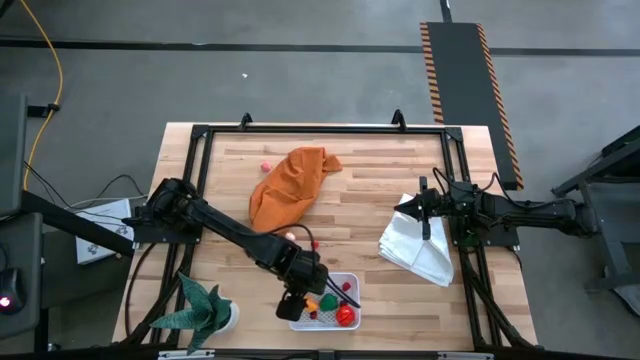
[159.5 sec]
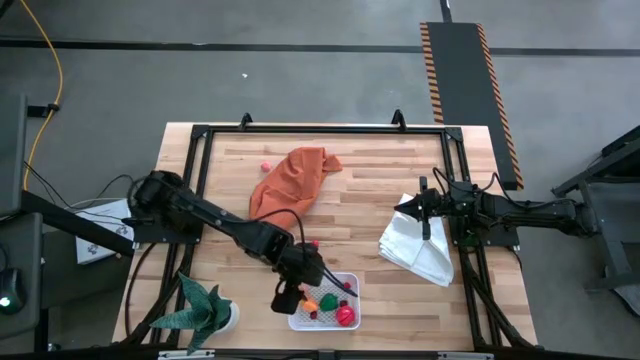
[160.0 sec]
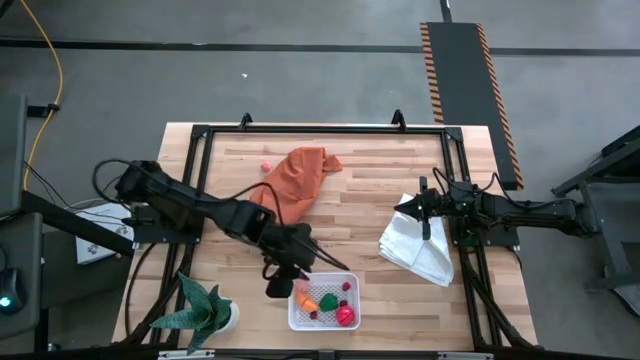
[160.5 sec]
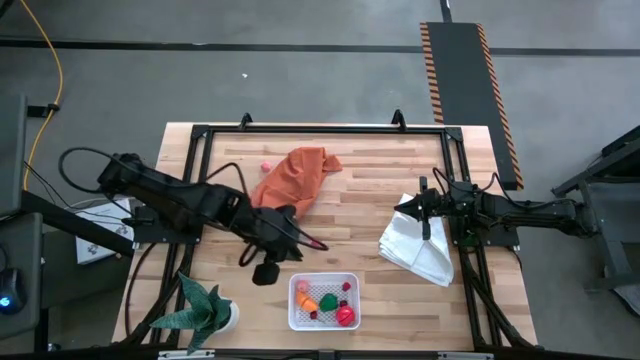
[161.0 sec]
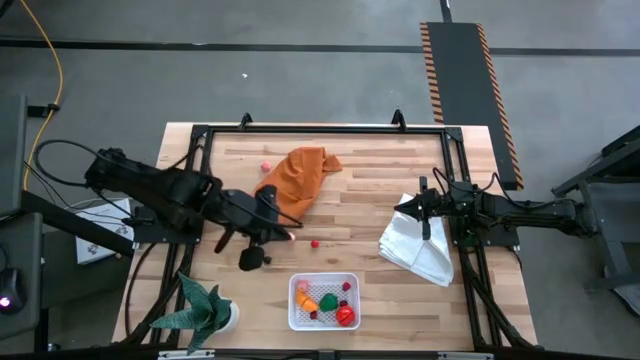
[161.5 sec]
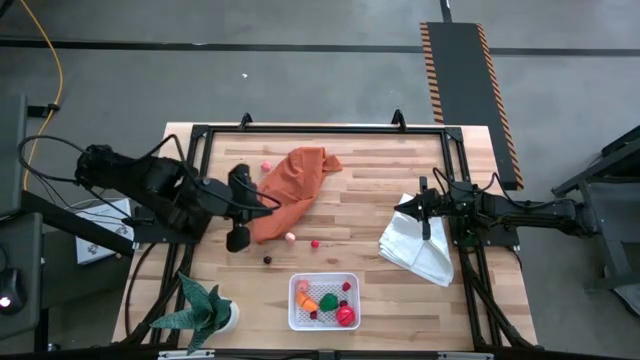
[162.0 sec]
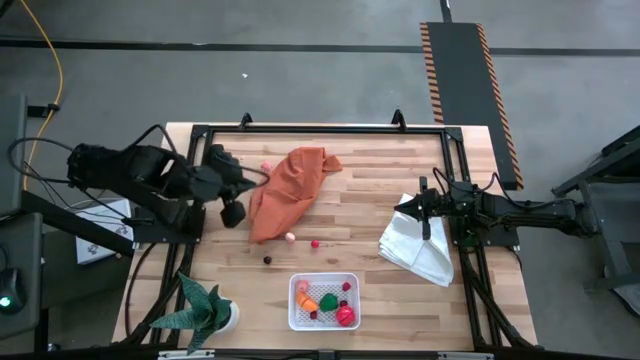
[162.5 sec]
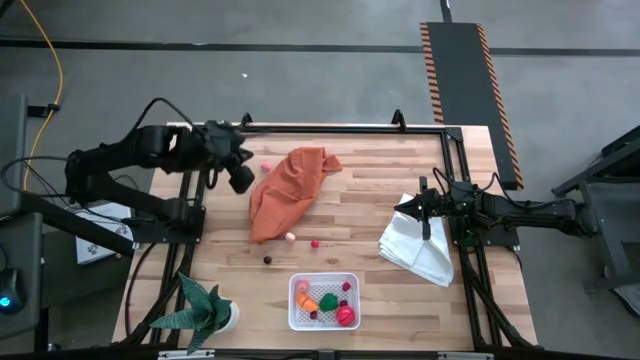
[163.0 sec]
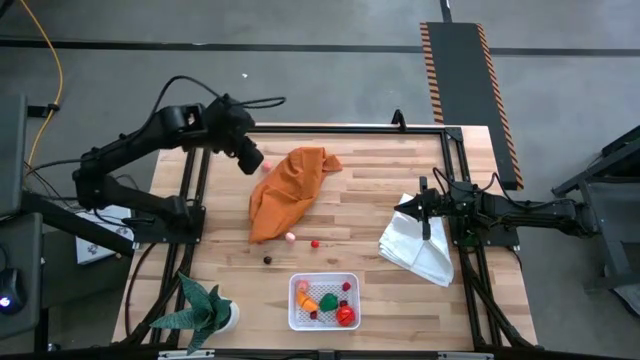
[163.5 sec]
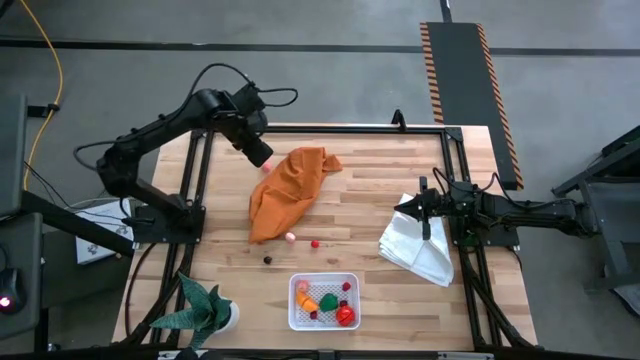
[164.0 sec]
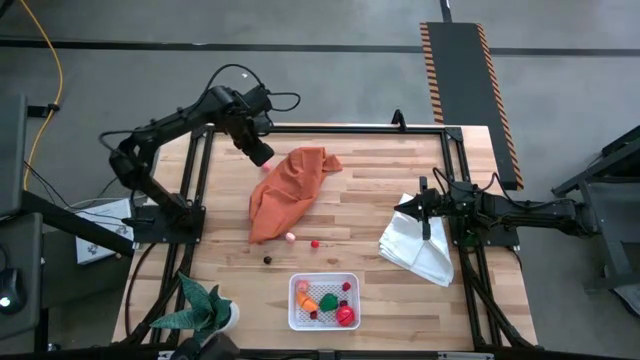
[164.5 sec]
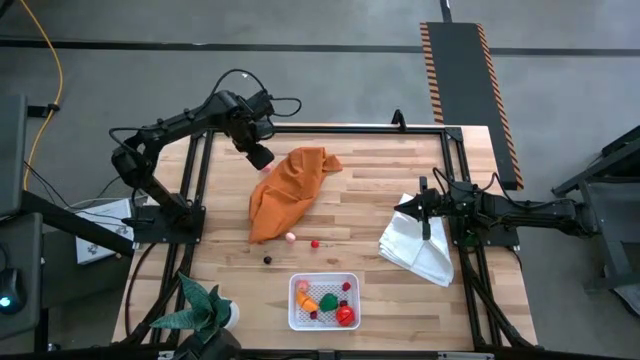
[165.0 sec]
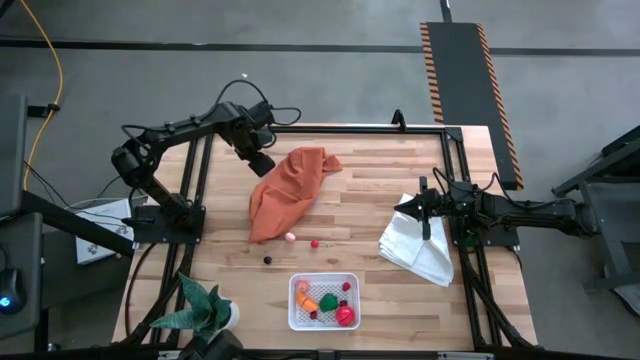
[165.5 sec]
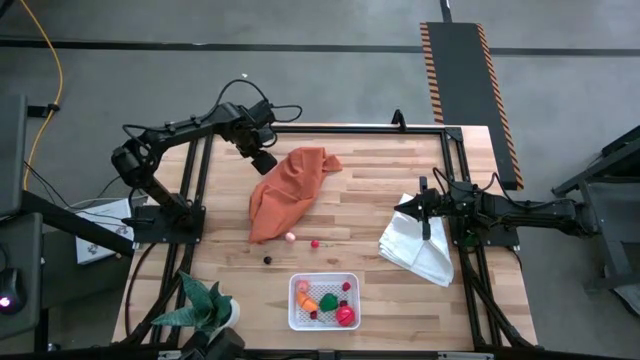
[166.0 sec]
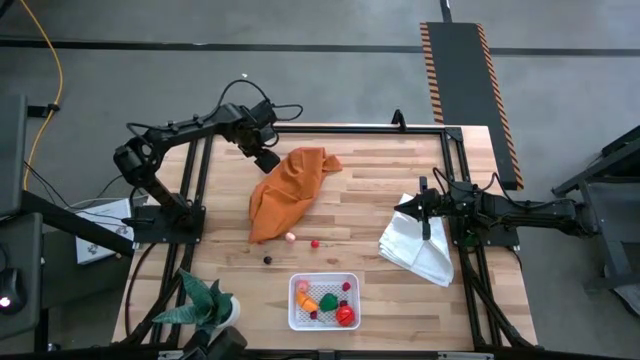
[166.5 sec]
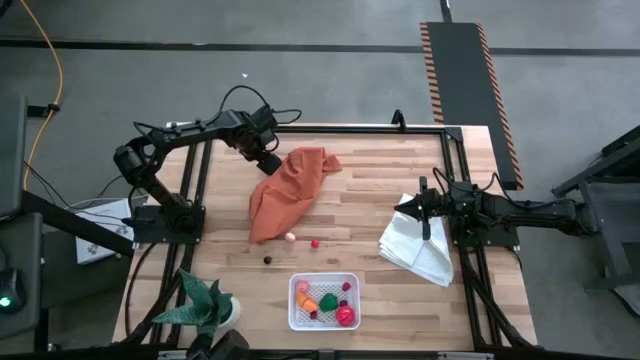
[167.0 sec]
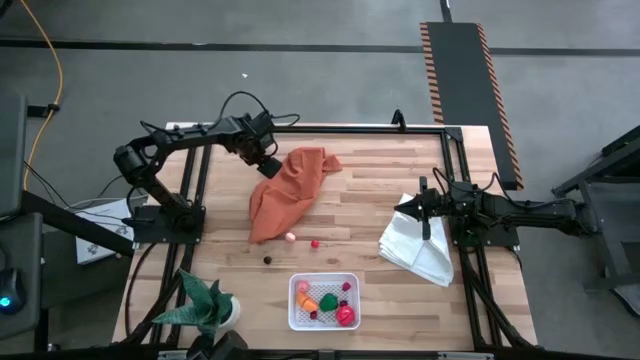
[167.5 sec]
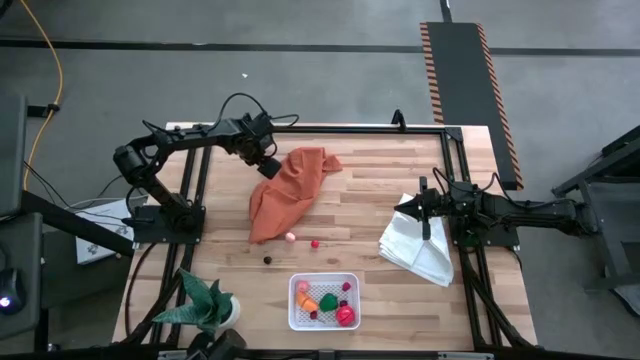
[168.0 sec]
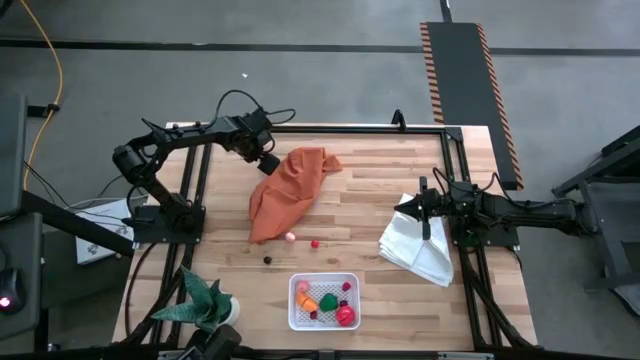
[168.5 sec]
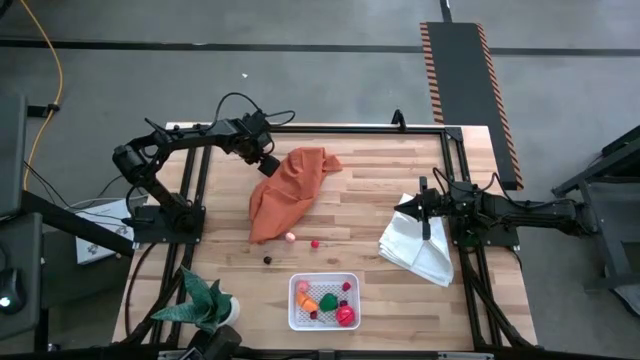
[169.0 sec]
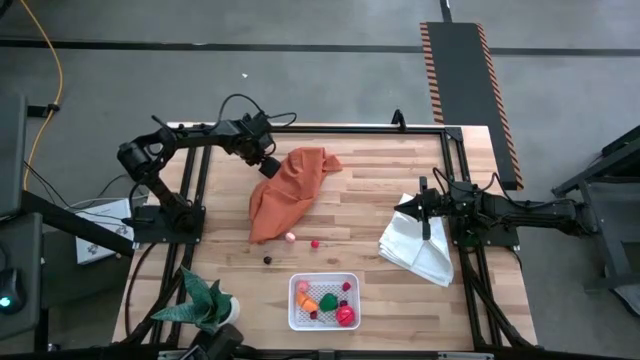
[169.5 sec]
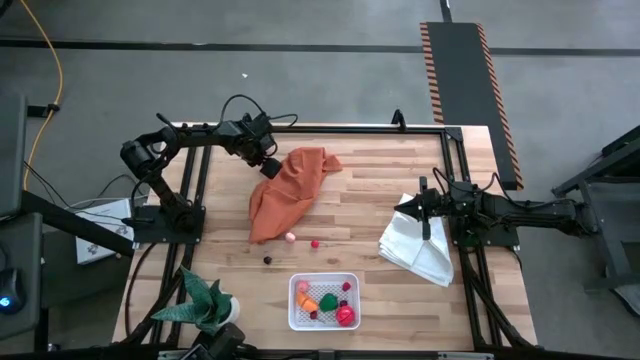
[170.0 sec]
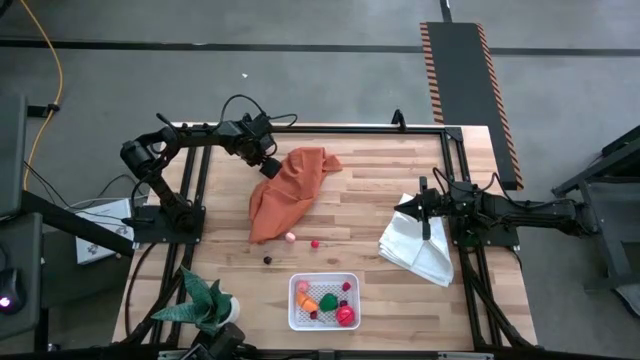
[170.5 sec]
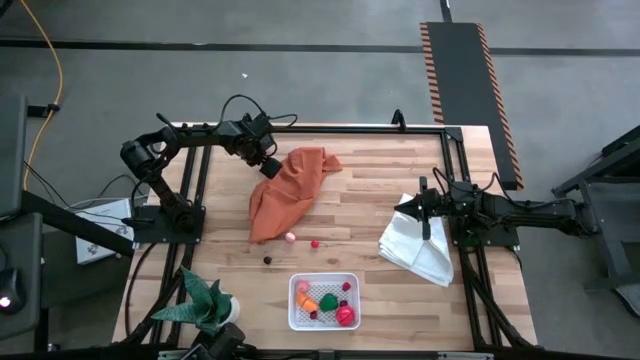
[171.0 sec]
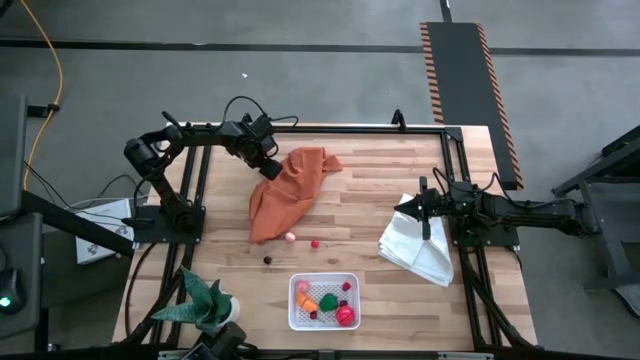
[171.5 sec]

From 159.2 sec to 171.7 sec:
Task: Pick and placing Produce into tupperware
Put the top peach into the white bin

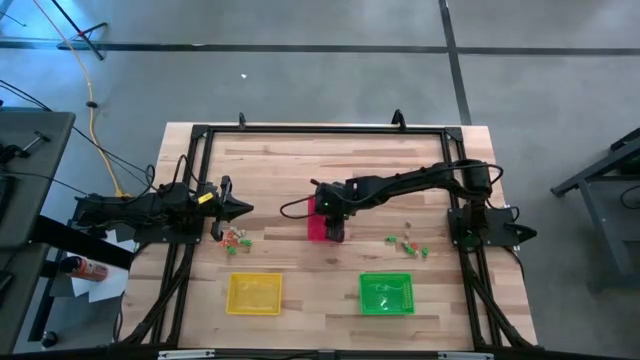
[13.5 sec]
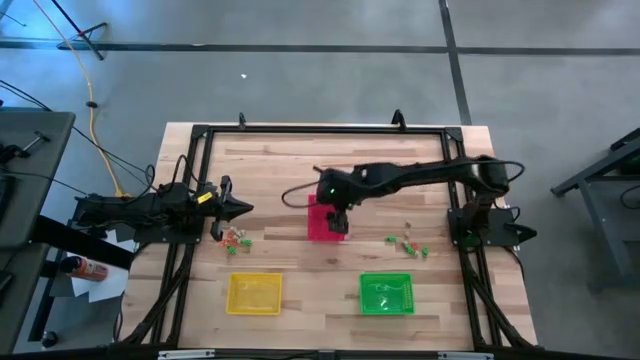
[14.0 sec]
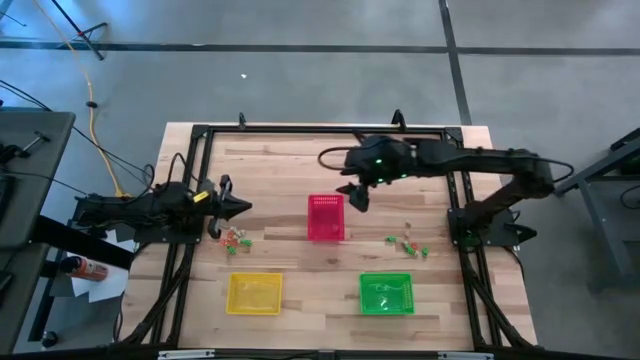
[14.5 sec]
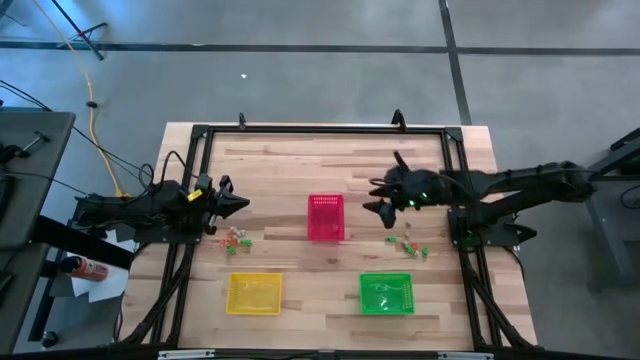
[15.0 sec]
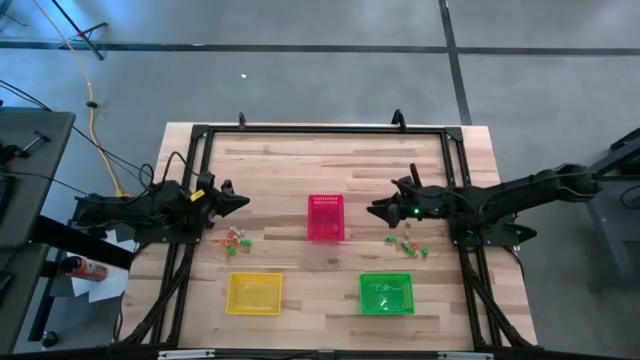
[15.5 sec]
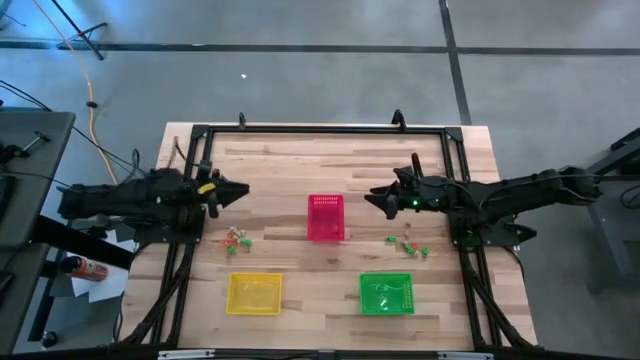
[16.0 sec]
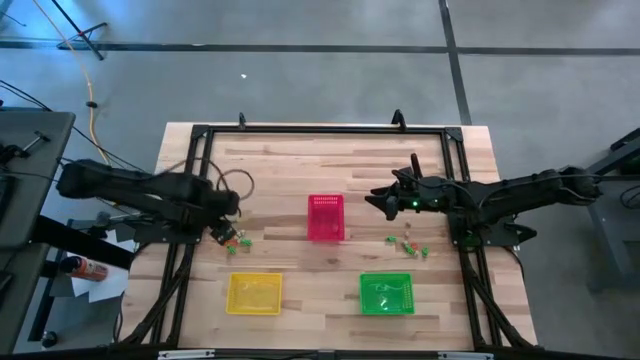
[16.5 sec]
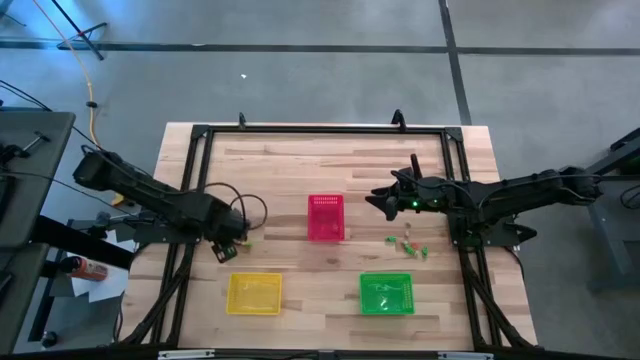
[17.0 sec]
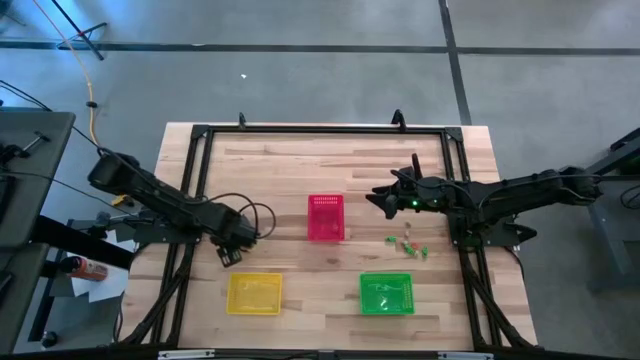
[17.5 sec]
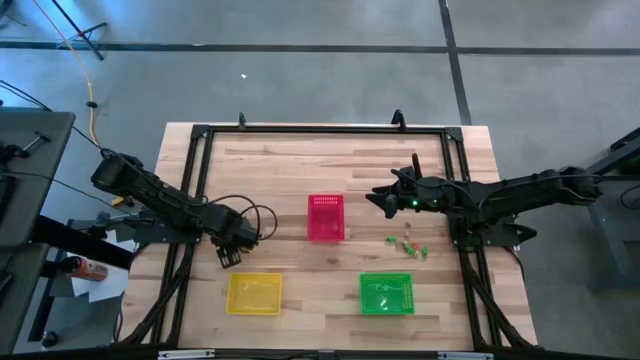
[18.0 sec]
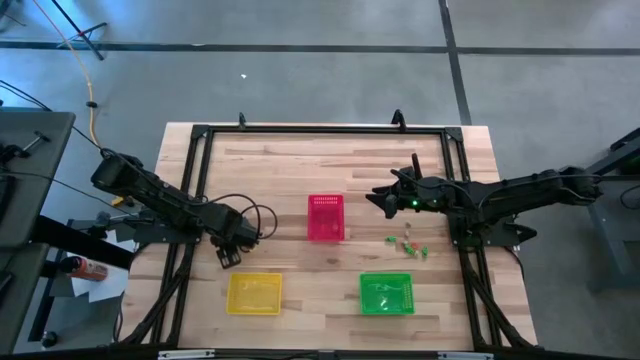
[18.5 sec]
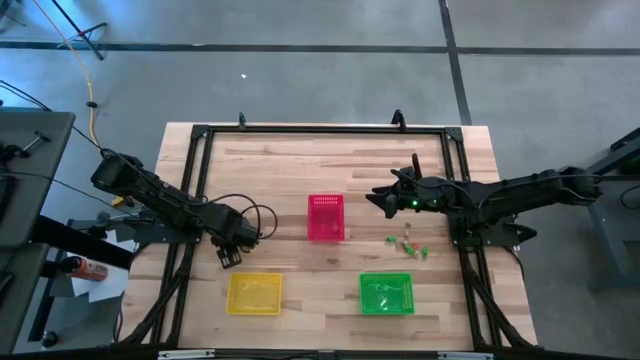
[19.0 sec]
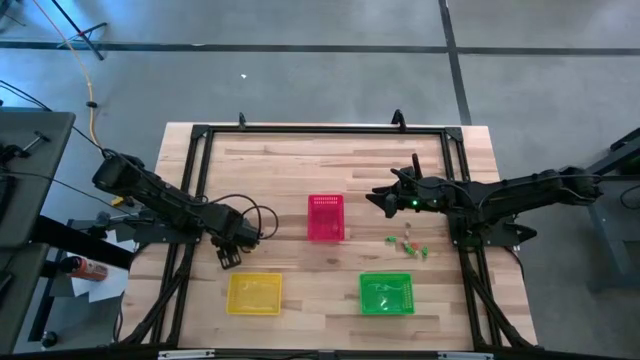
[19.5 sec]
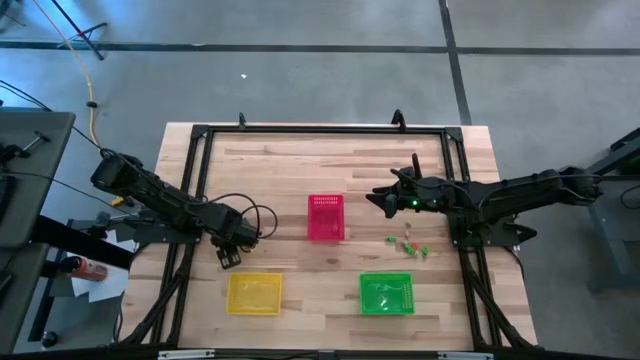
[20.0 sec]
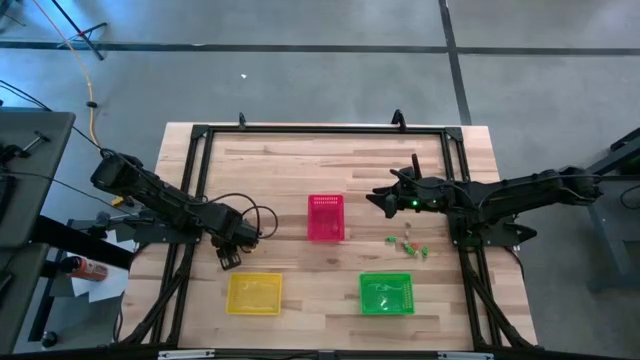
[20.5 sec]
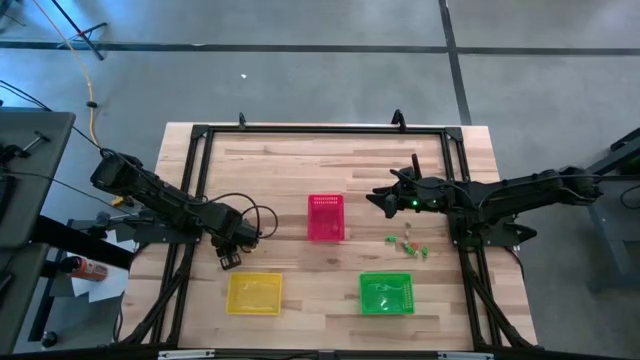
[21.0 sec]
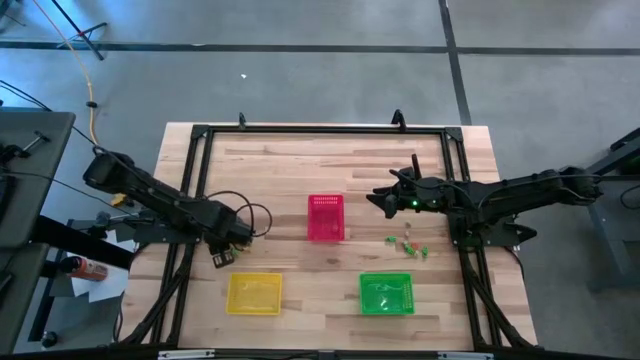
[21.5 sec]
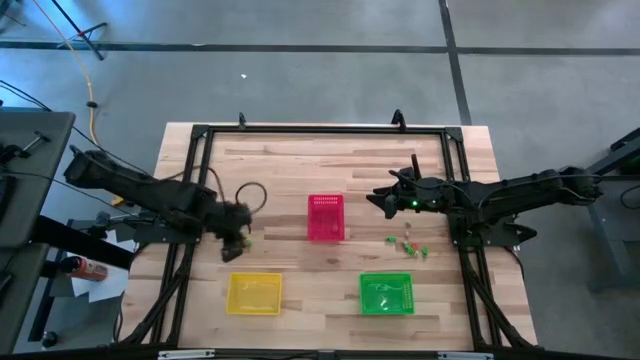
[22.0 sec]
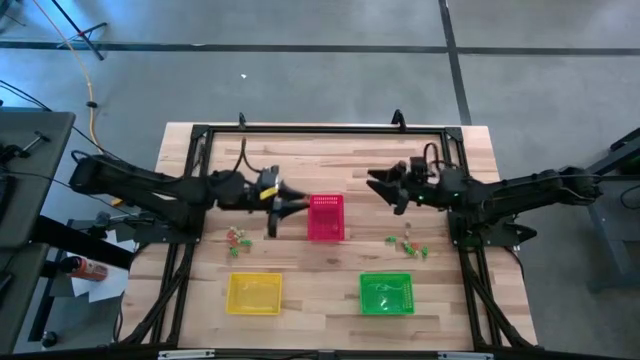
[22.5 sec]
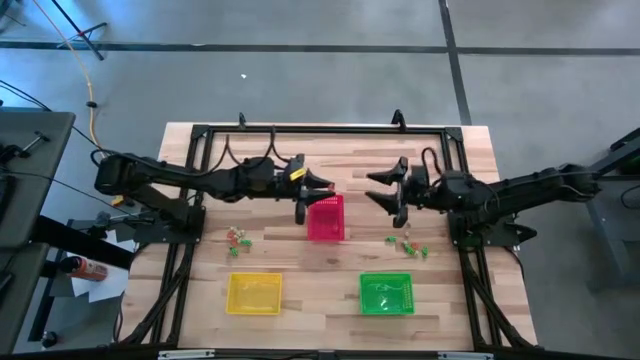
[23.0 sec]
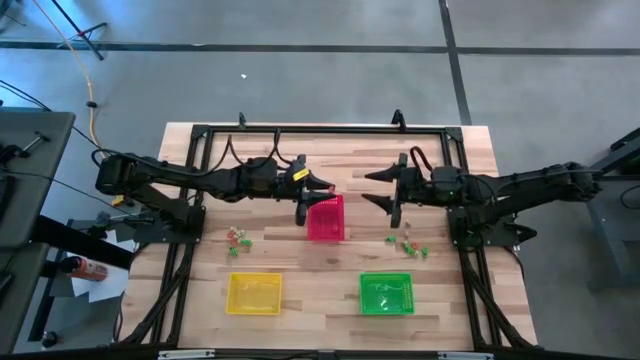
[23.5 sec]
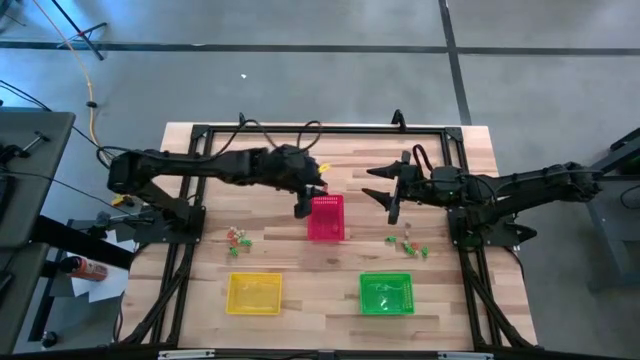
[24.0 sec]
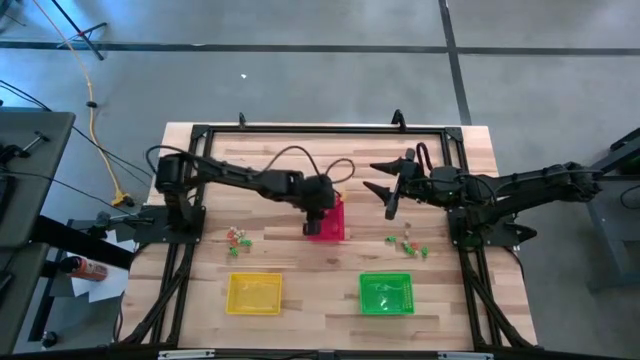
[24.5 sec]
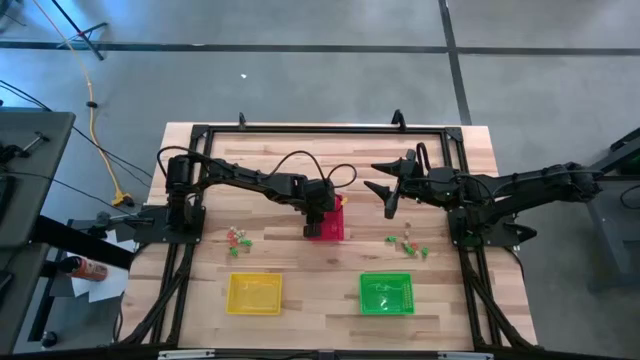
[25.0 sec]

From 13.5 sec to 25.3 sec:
Task: Sort Halloween decoration
Put the orange pumpkin toy into the red bin
